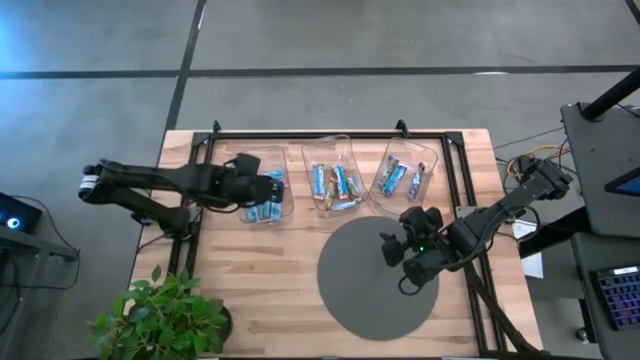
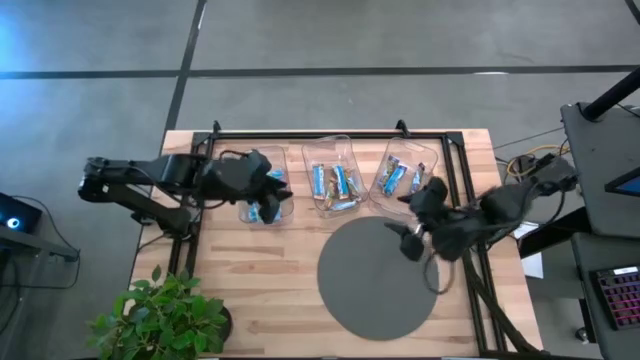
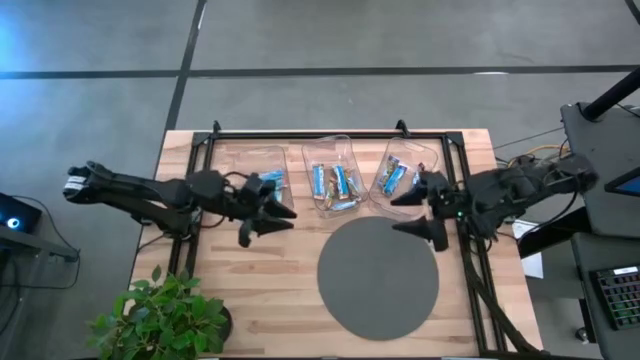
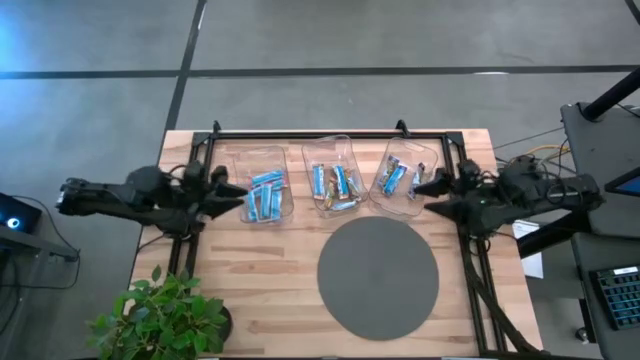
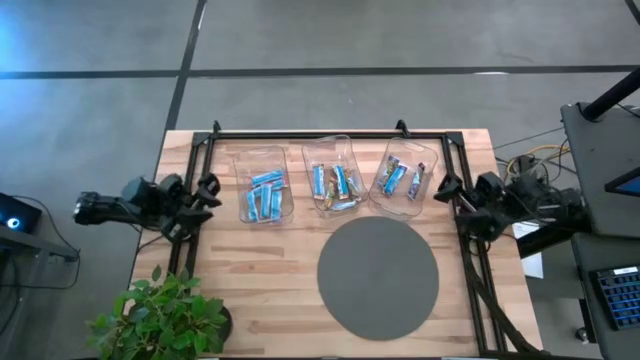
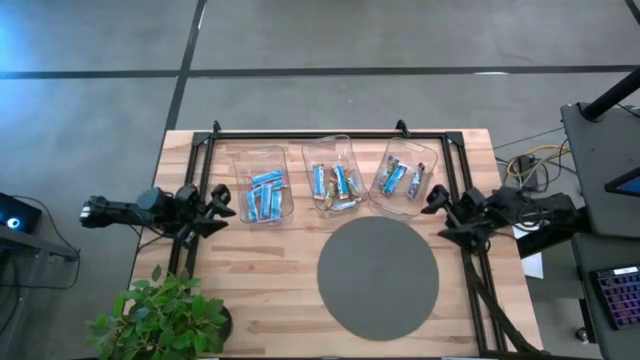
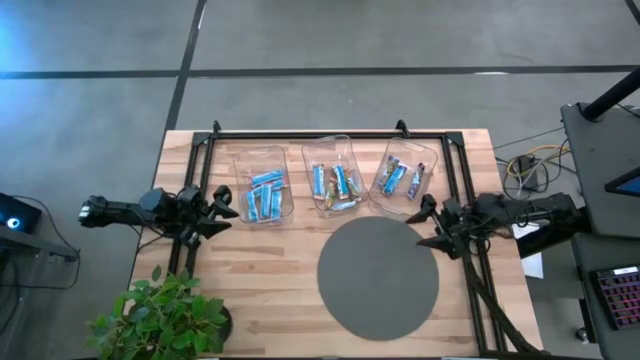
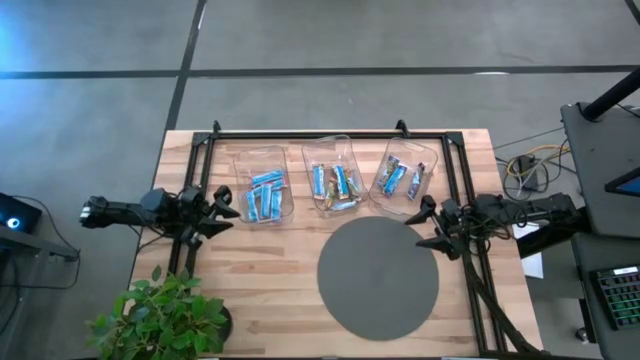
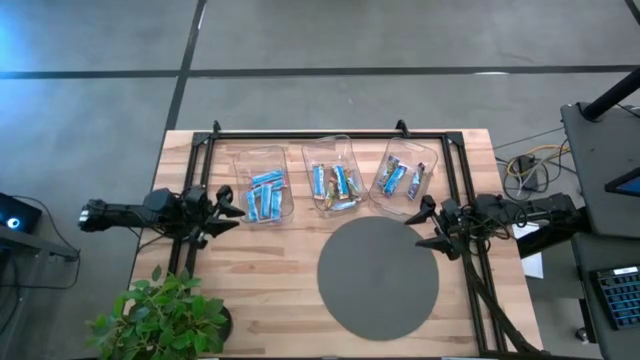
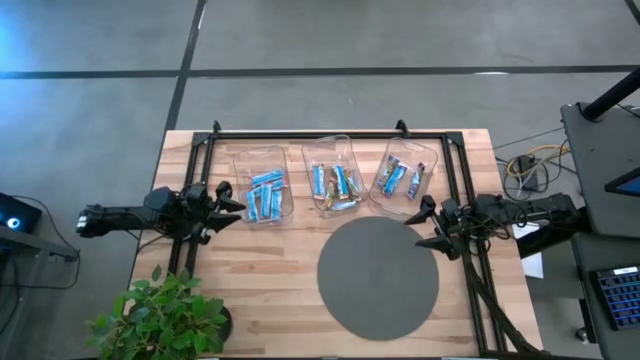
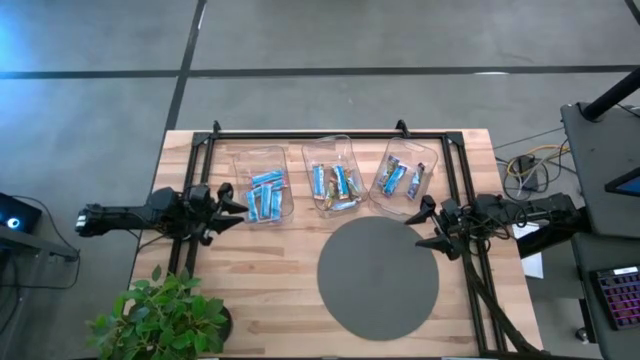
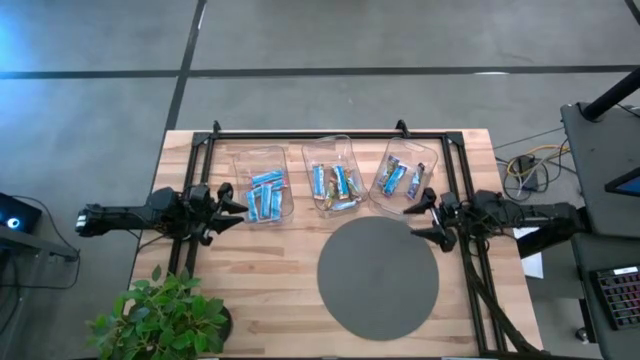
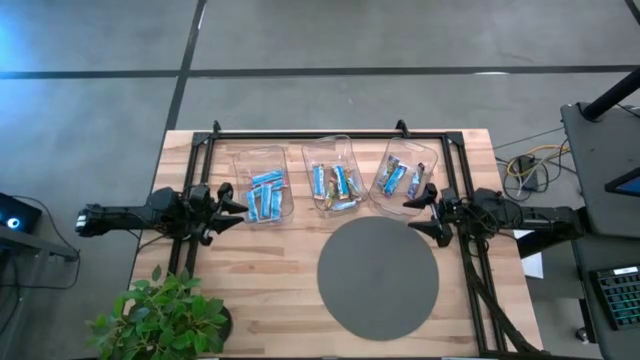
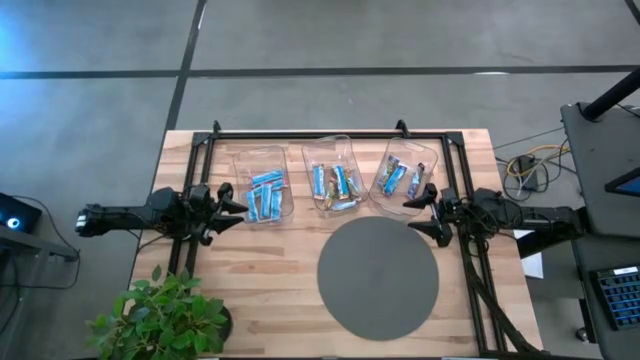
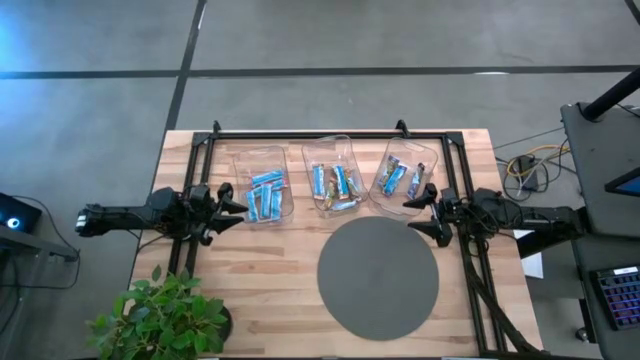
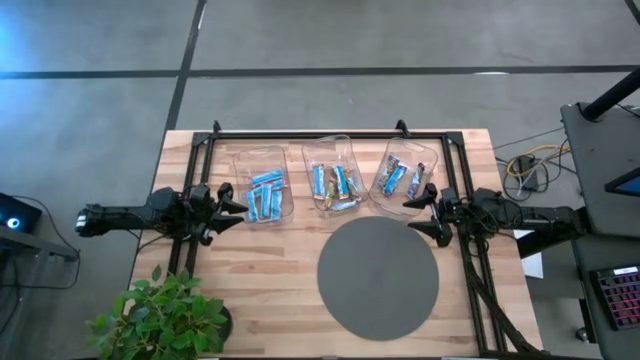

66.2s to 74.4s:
Task: Pick and place Granola Bars by type
Return to Home Position

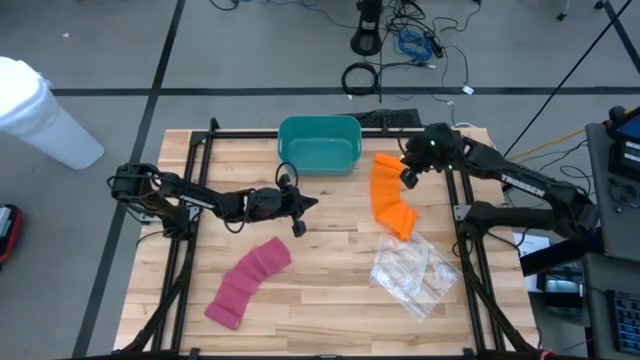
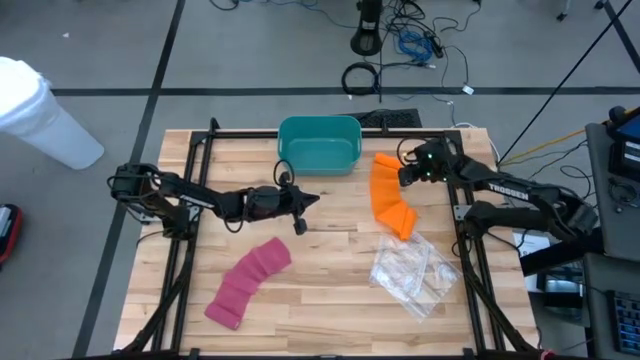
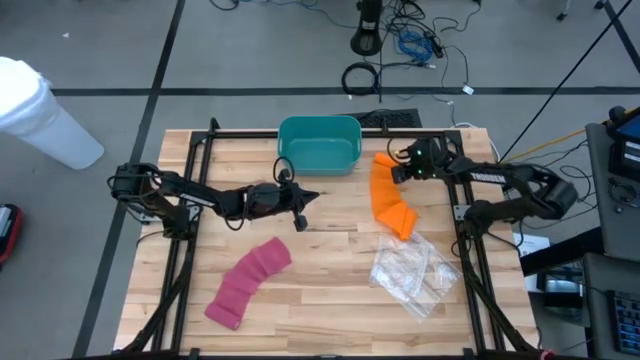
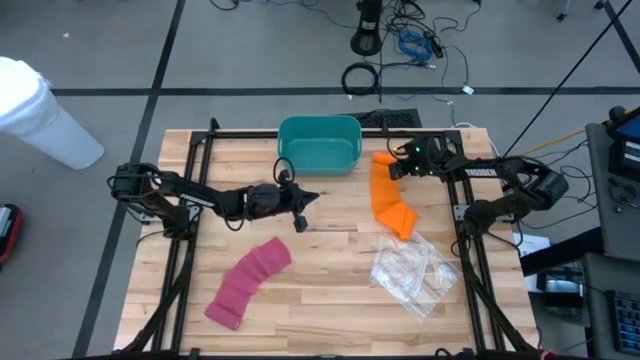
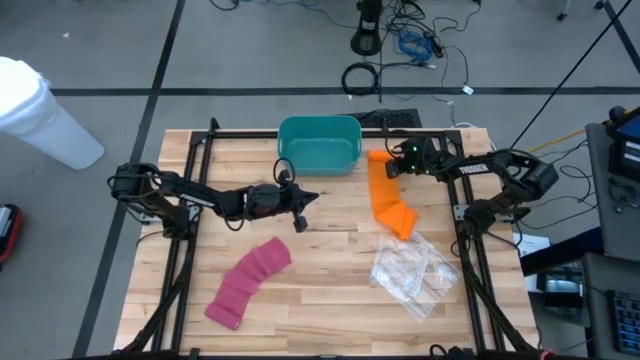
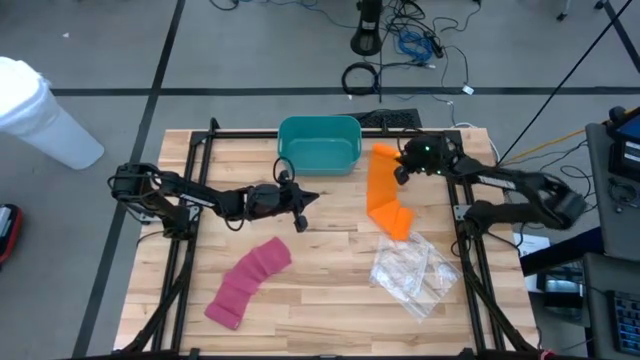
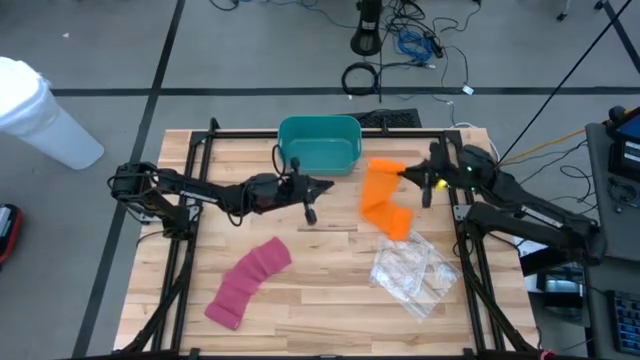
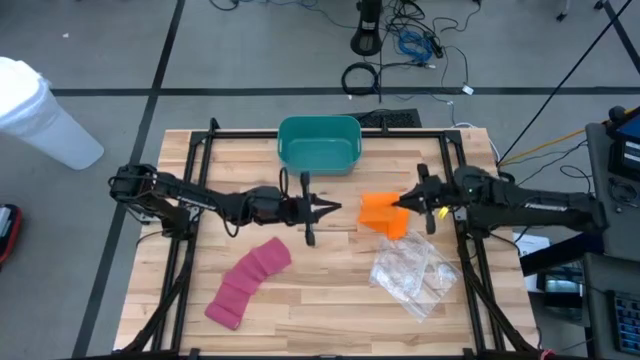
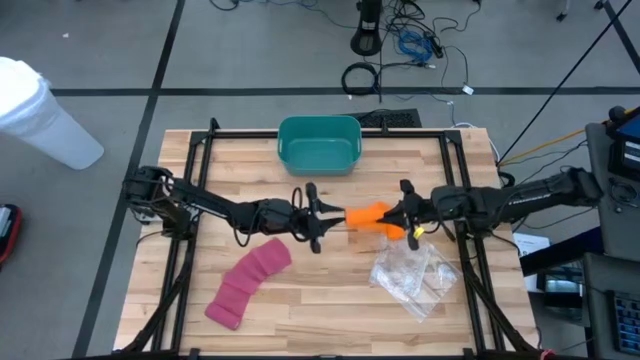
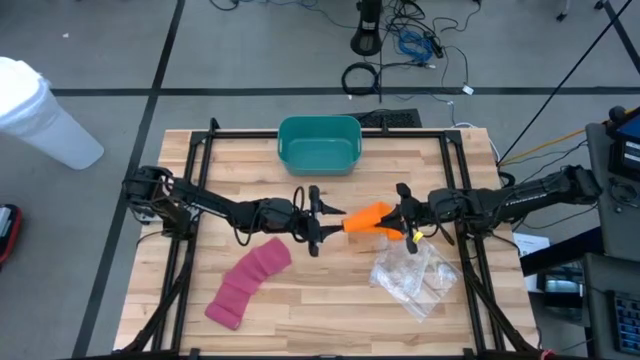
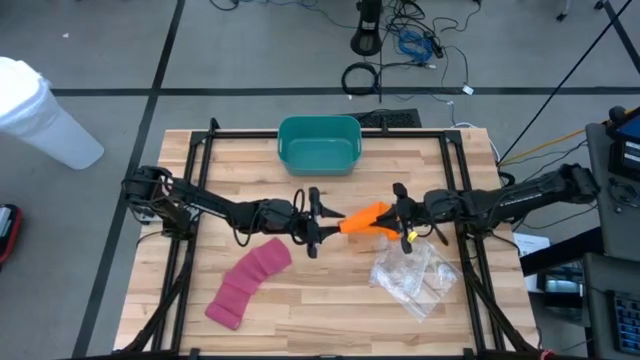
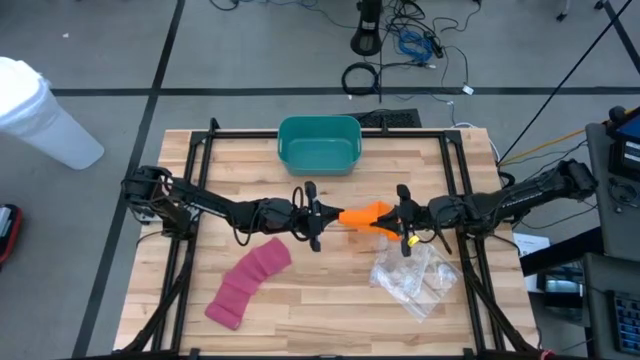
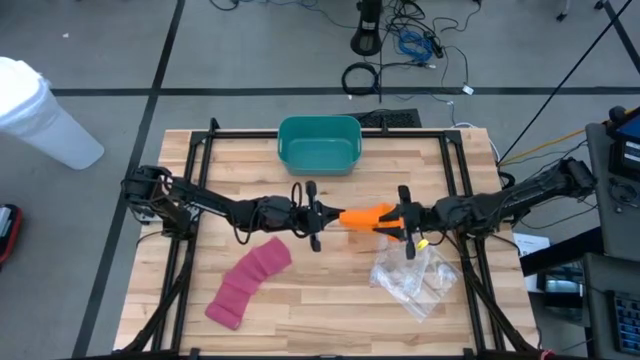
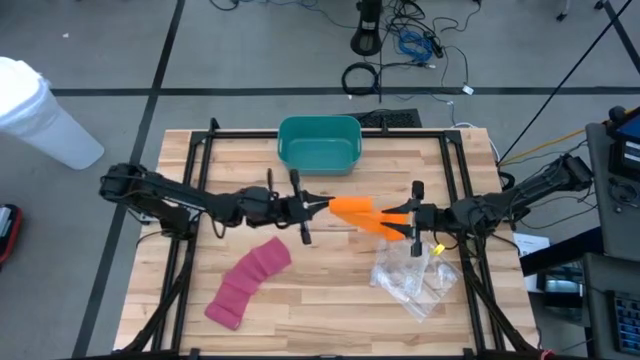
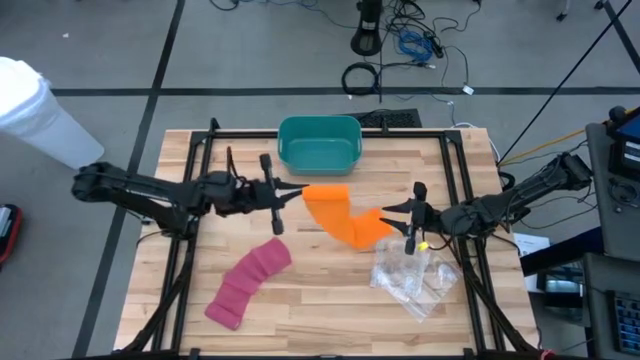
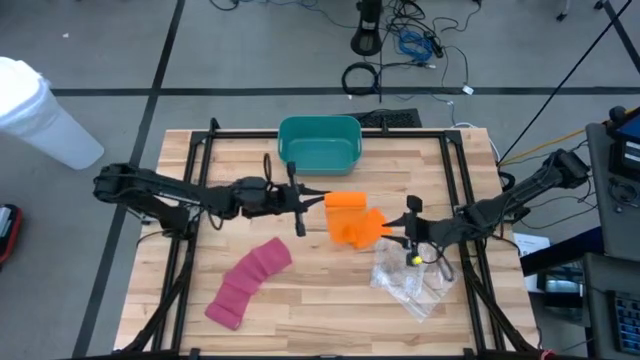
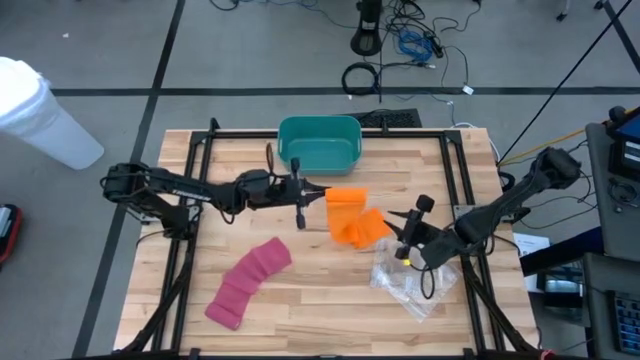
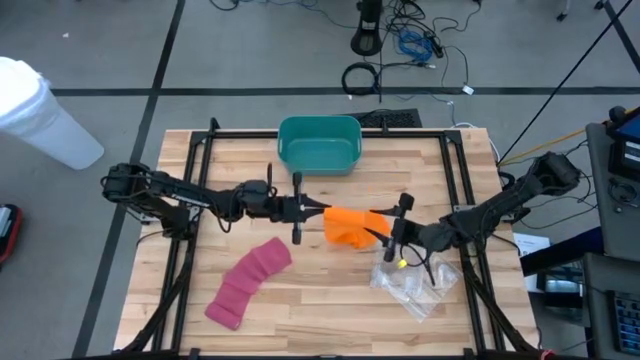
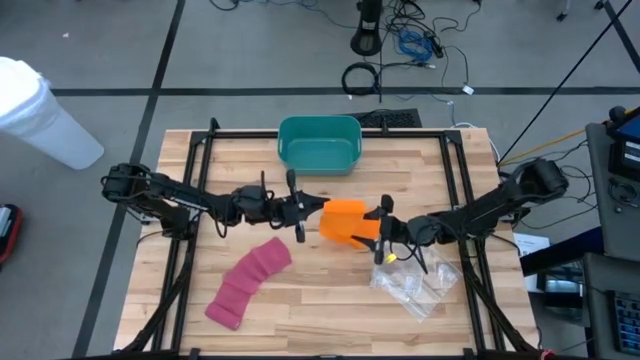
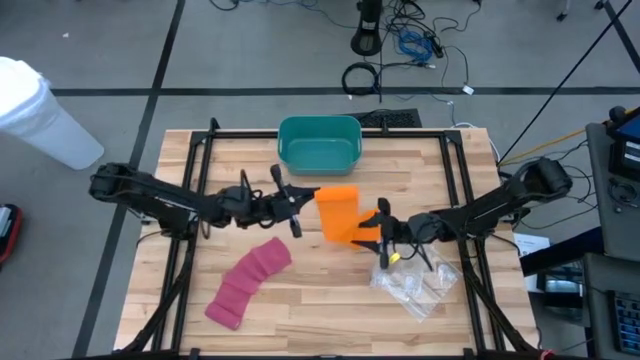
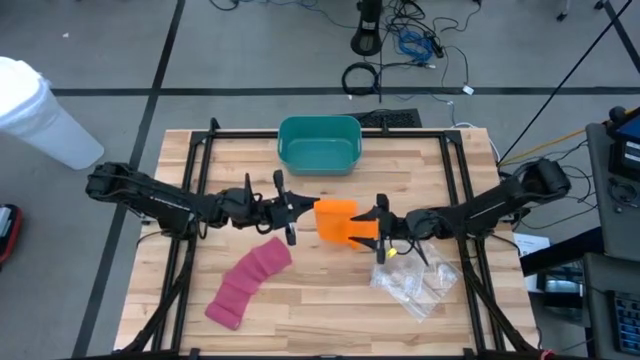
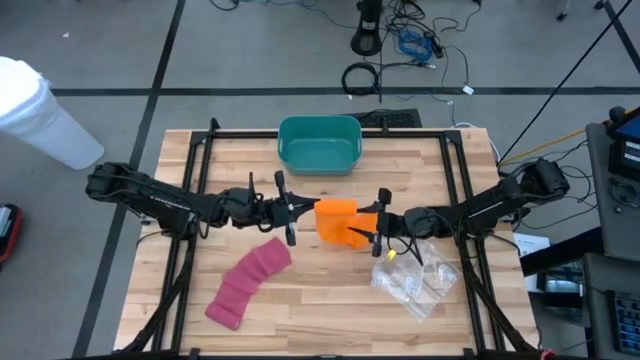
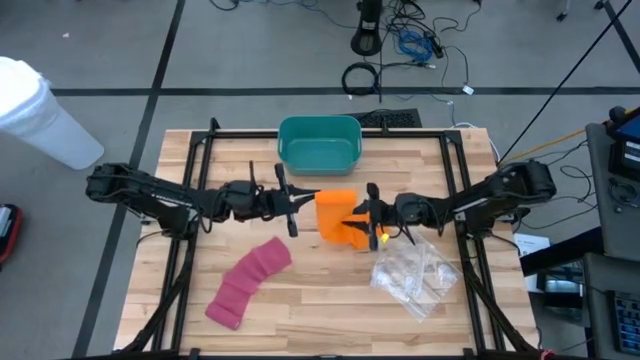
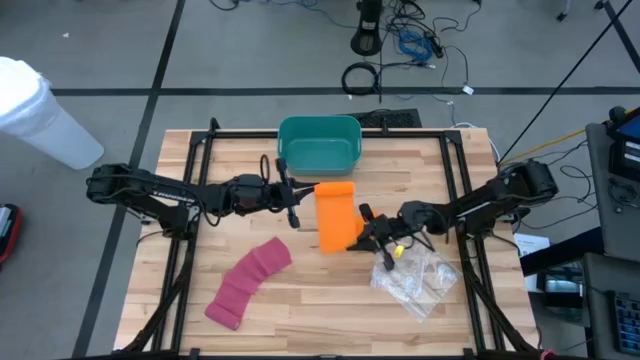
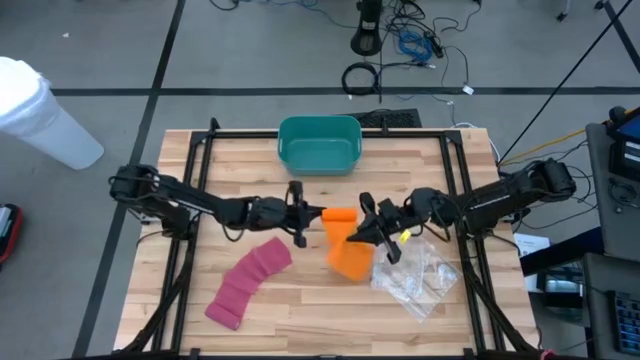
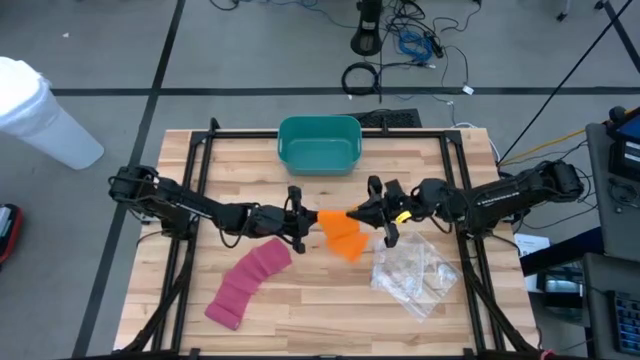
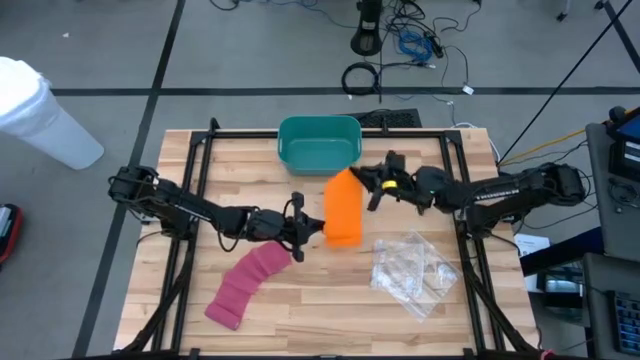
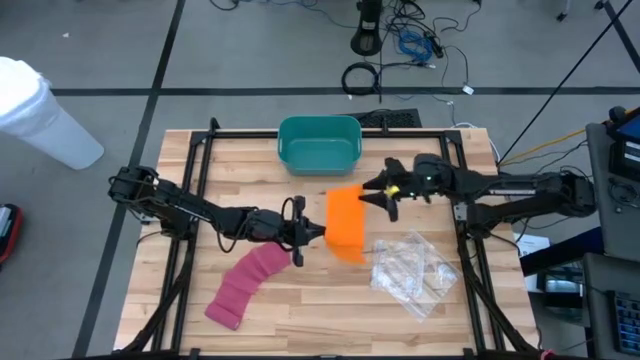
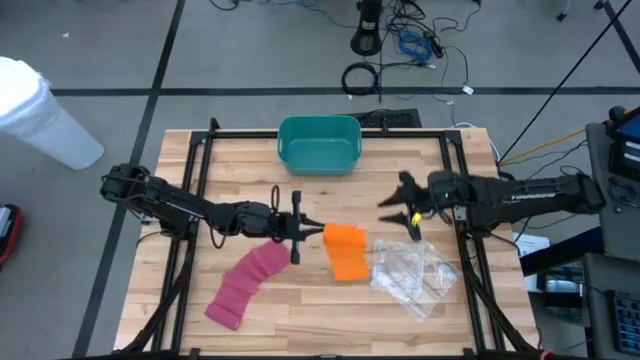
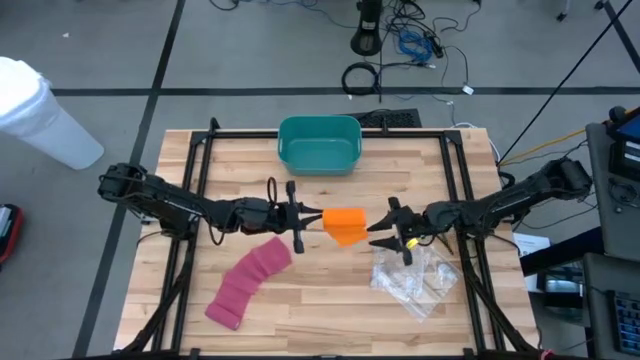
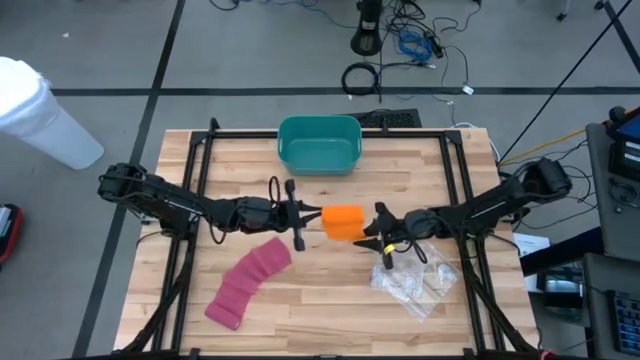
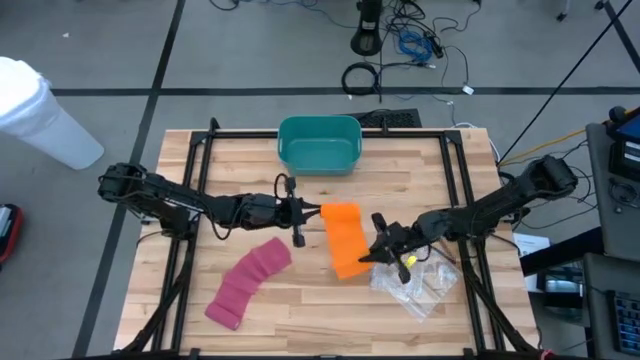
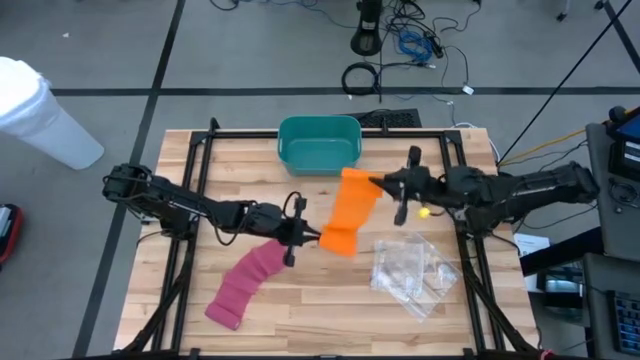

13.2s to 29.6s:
Task: Roll bandage
Roll the orange bandage
